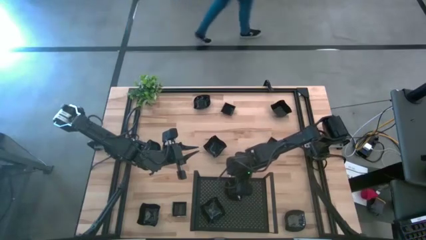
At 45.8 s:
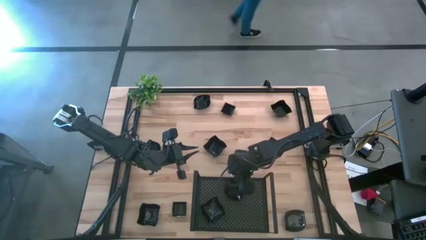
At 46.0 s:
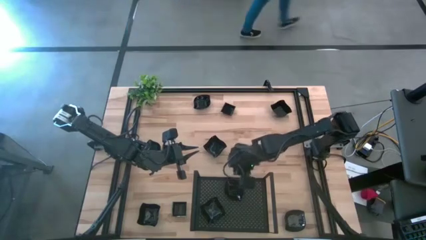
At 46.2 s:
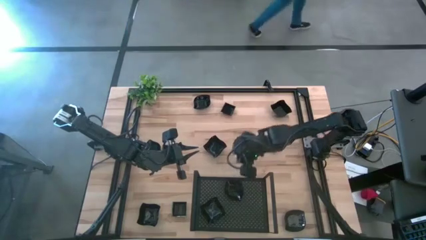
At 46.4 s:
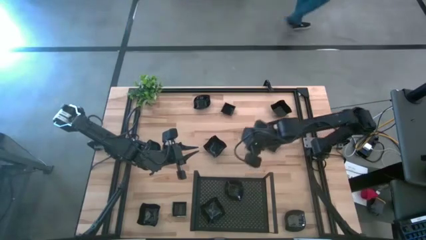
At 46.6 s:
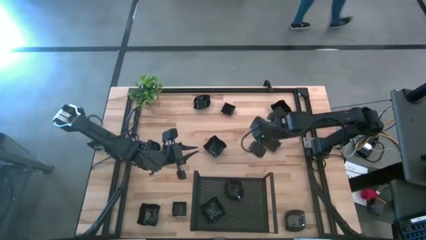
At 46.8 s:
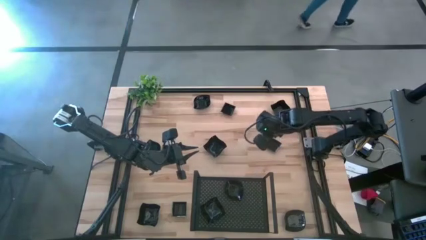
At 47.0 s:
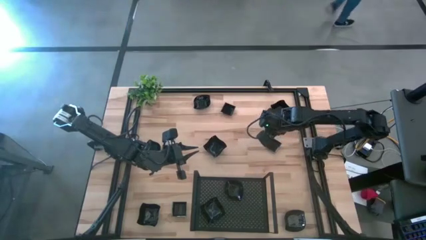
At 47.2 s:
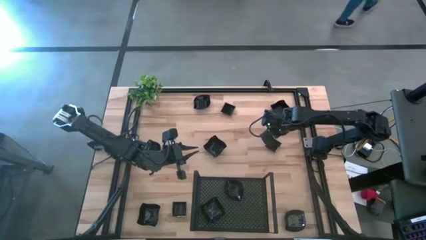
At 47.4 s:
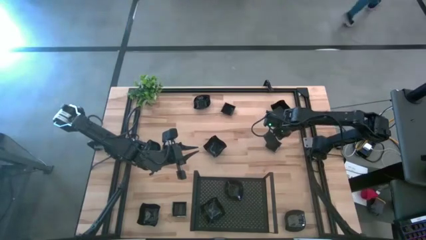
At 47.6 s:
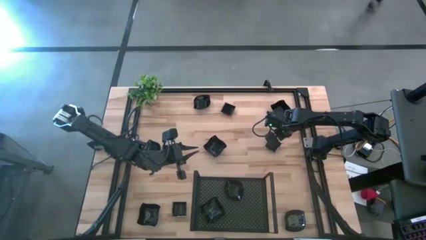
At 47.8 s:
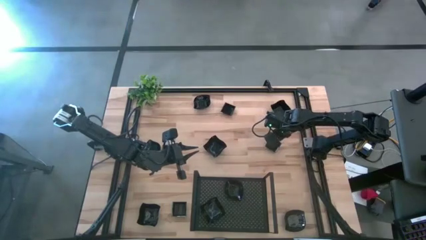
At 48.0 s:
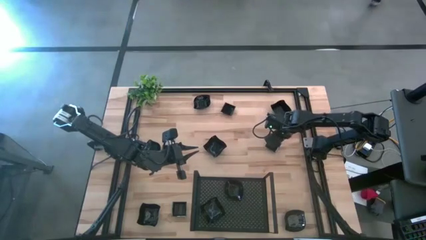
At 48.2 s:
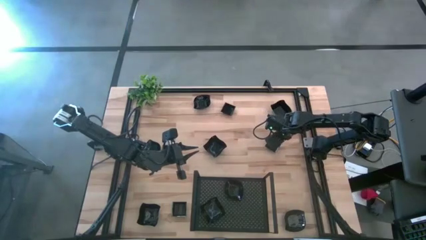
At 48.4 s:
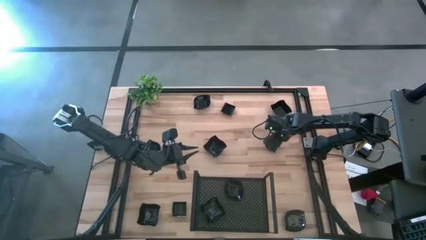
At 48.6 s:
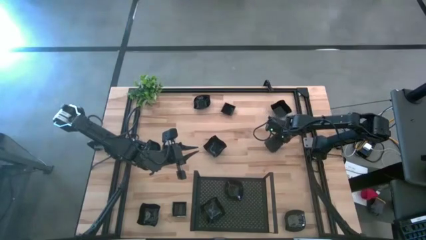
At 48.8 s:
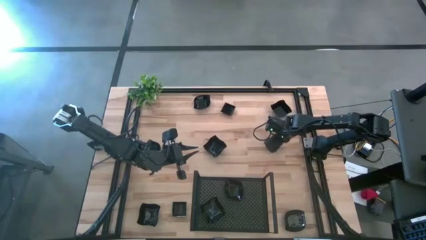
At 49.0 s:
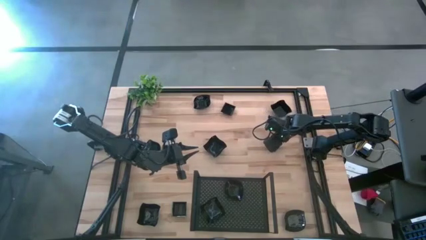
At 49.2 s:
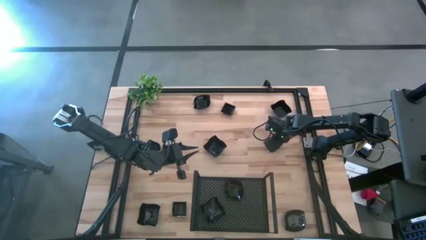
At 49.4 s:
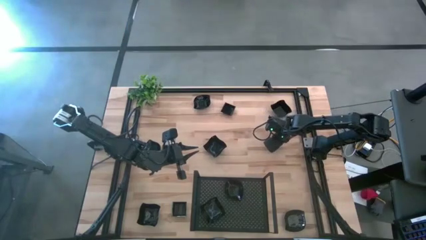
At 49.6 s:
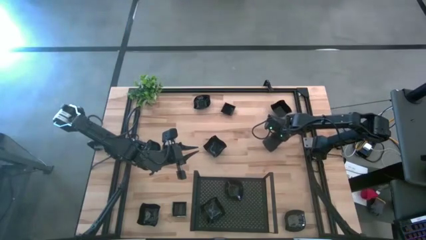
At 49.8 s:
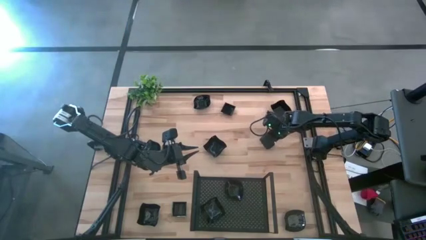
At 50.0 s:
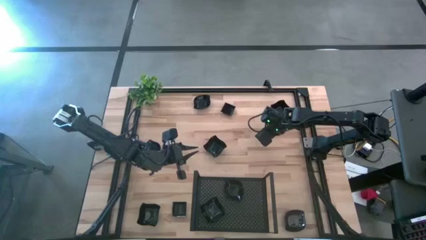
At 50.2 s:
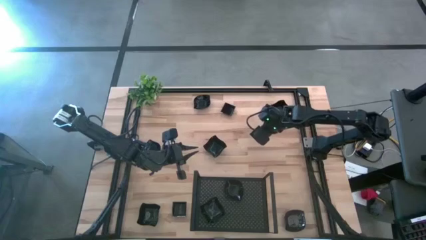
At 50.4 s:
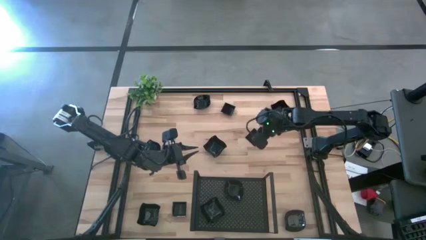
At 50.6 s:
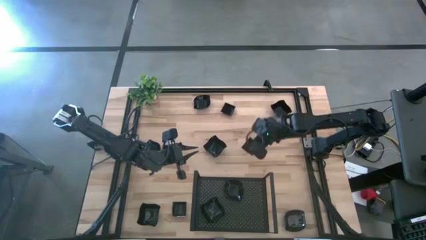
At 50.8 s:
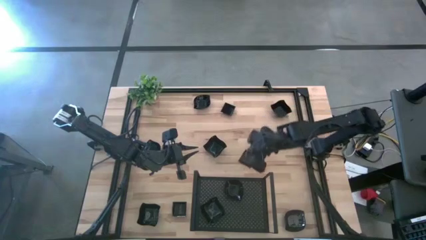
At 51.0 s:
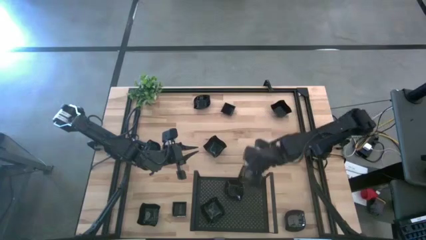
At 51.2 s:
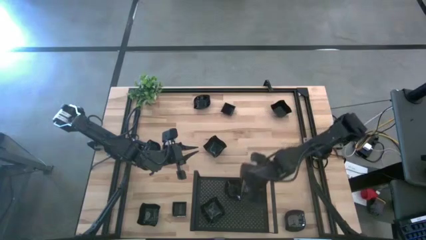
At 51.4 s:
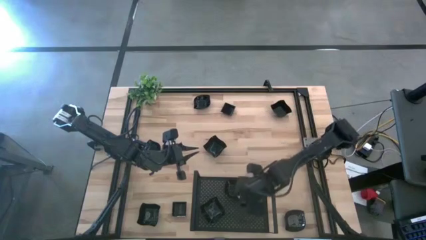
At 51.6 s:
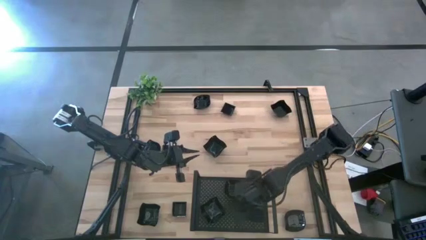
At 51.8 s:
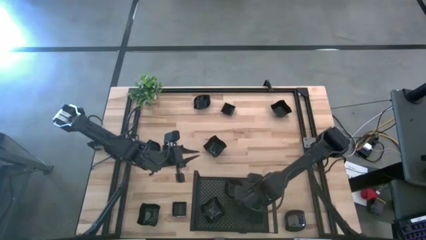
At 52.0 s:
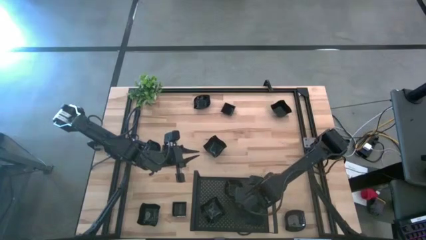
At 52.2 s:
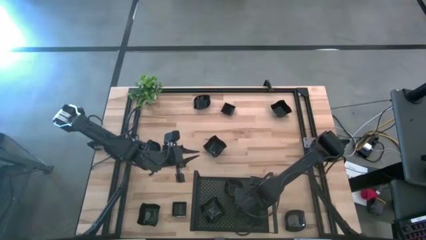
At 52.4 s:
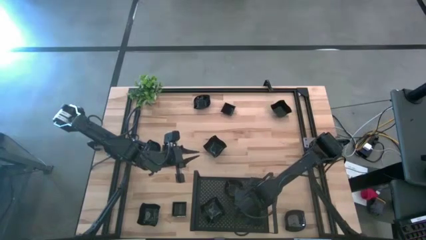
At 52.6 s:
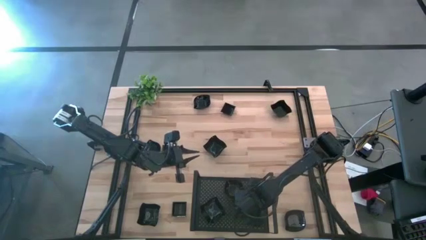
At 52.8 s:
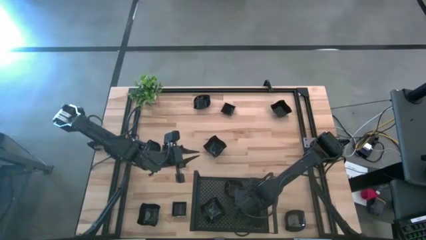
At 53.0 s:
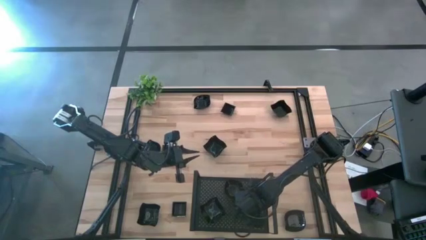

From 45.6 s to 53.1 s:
Task: Pick & Place Mini shaped plates
Put the square plate on the shelf

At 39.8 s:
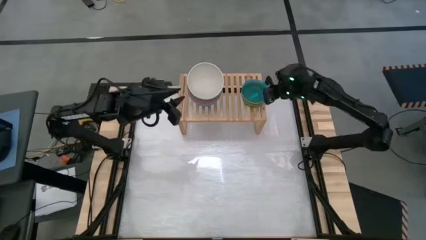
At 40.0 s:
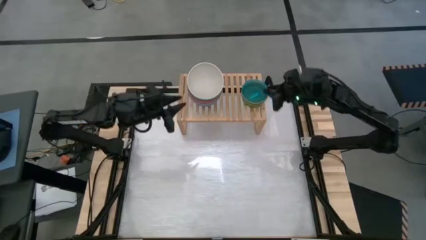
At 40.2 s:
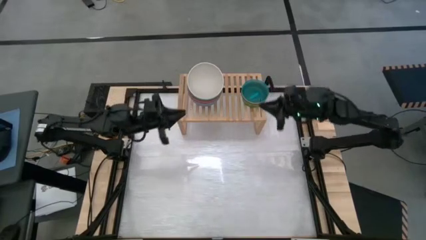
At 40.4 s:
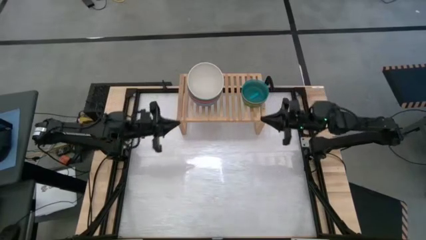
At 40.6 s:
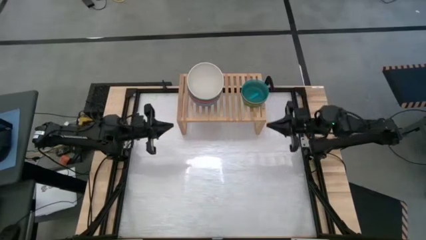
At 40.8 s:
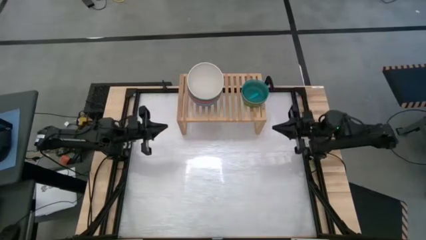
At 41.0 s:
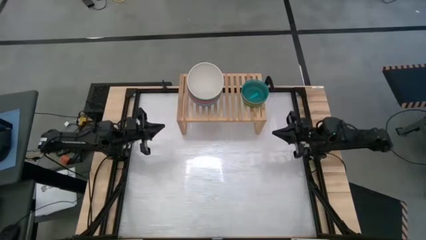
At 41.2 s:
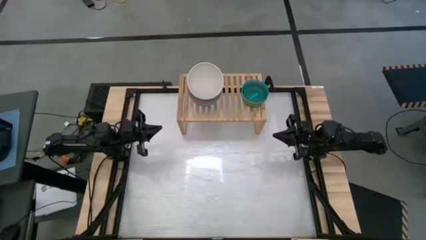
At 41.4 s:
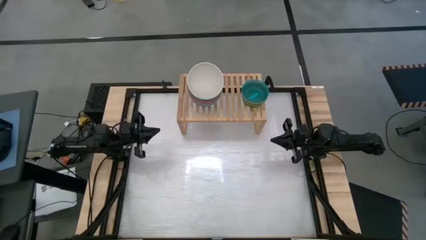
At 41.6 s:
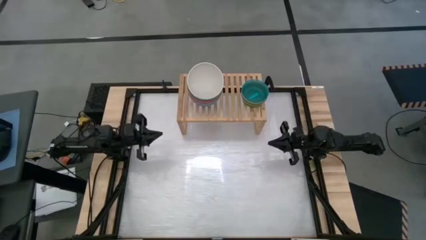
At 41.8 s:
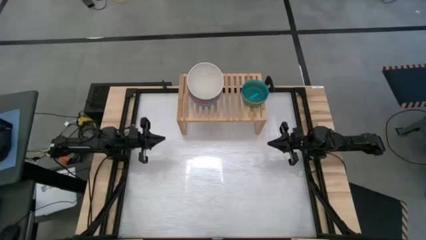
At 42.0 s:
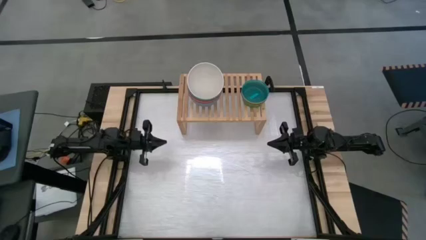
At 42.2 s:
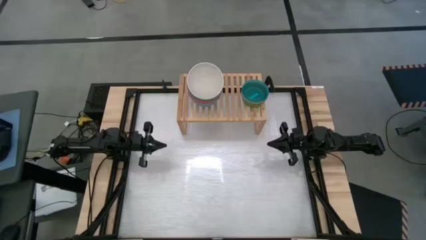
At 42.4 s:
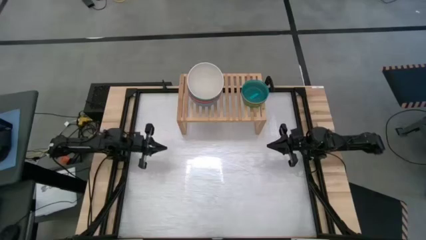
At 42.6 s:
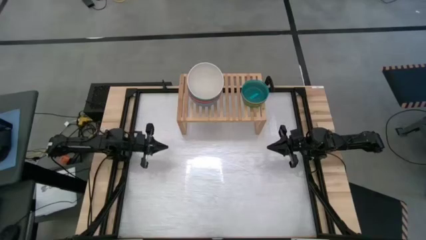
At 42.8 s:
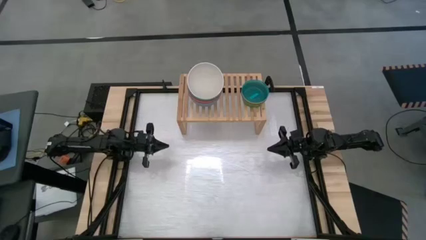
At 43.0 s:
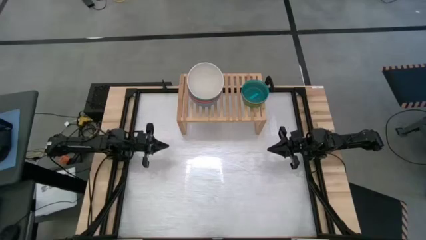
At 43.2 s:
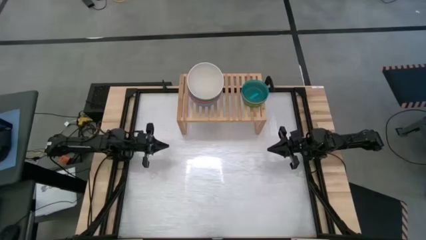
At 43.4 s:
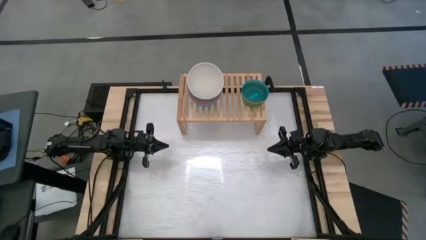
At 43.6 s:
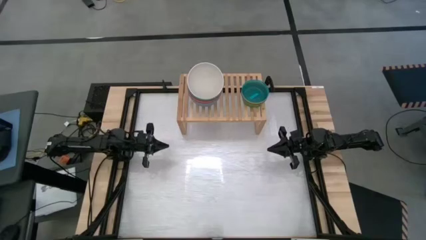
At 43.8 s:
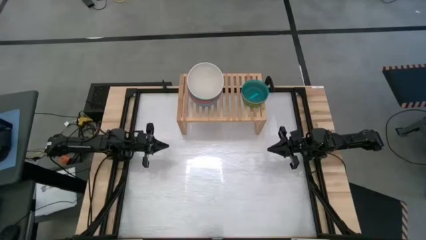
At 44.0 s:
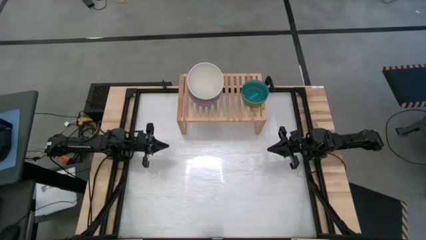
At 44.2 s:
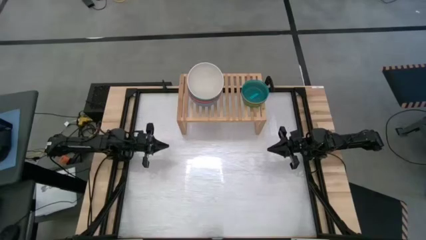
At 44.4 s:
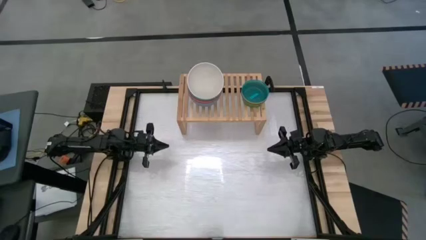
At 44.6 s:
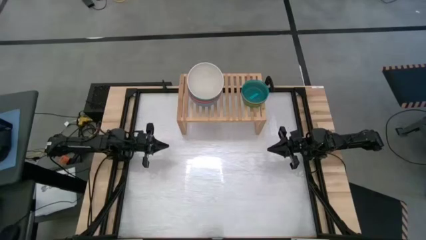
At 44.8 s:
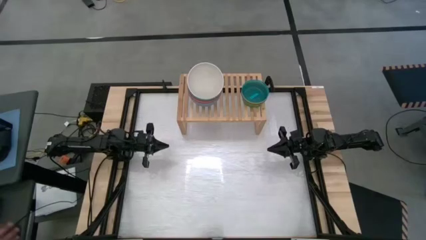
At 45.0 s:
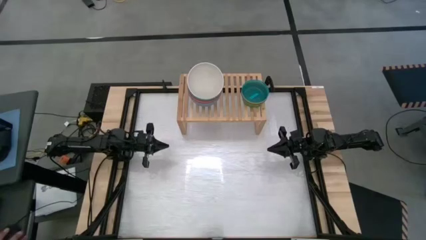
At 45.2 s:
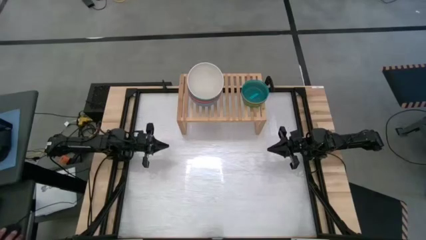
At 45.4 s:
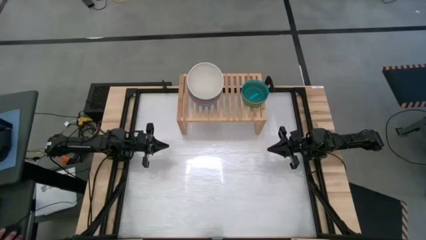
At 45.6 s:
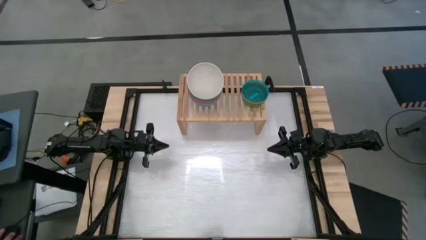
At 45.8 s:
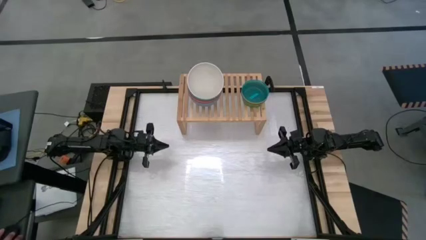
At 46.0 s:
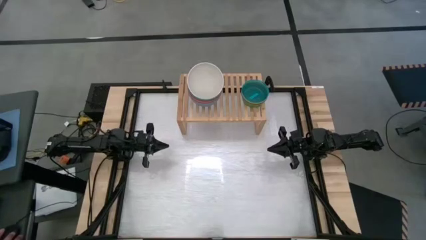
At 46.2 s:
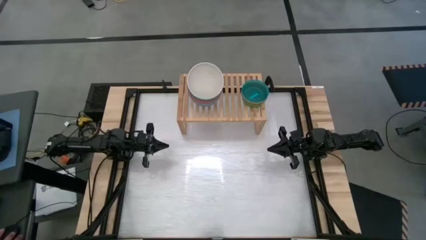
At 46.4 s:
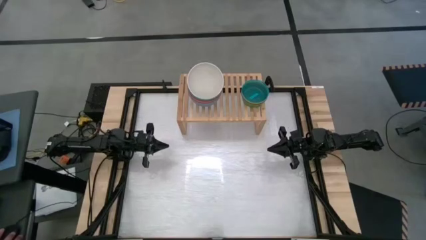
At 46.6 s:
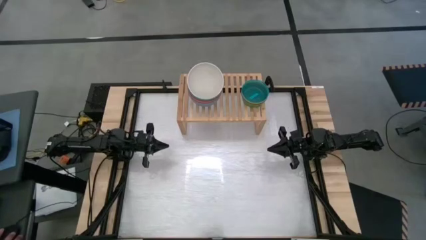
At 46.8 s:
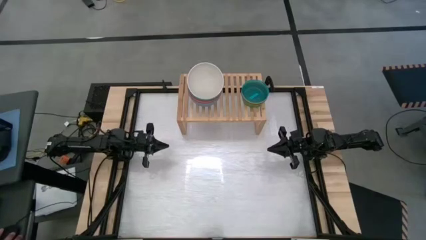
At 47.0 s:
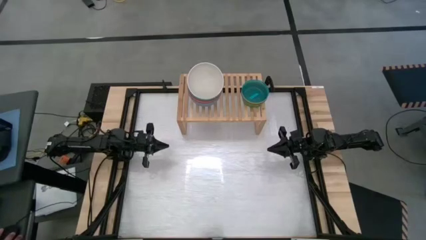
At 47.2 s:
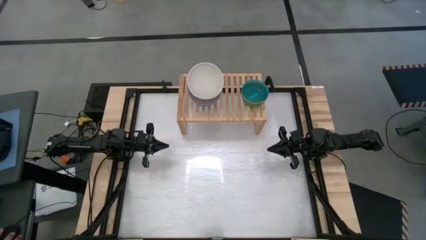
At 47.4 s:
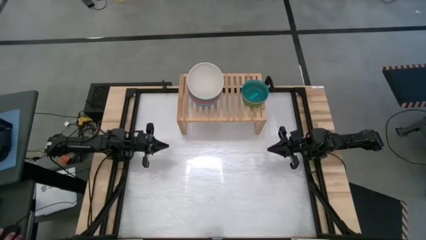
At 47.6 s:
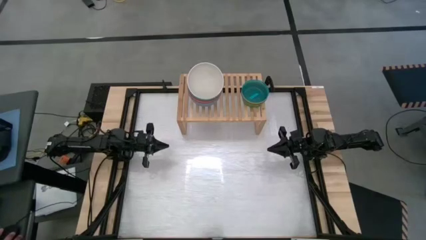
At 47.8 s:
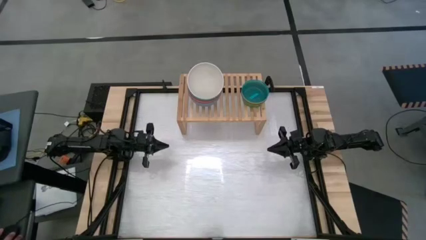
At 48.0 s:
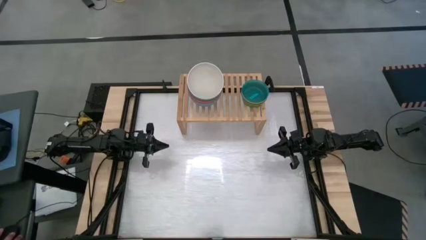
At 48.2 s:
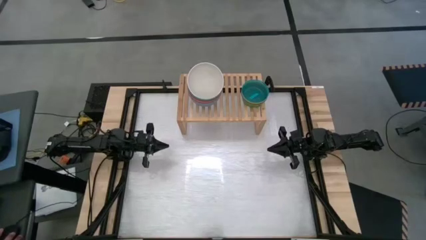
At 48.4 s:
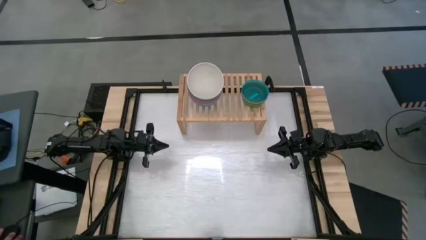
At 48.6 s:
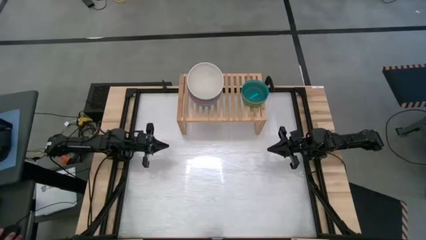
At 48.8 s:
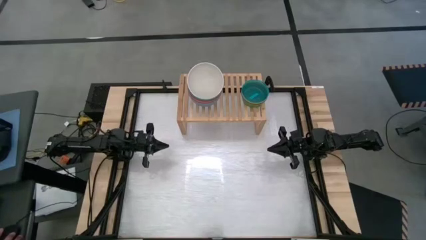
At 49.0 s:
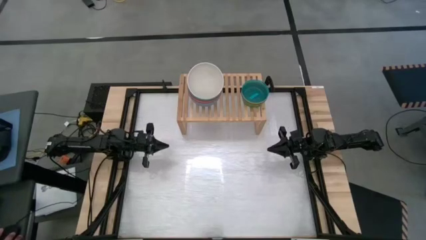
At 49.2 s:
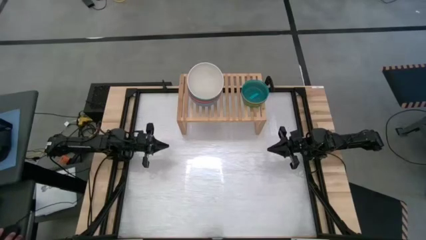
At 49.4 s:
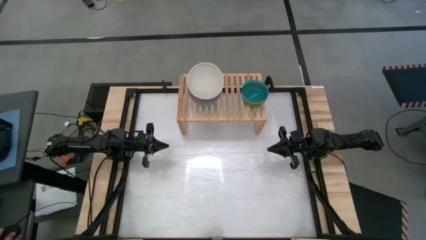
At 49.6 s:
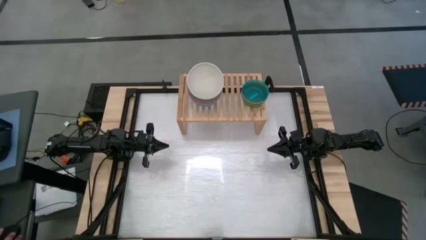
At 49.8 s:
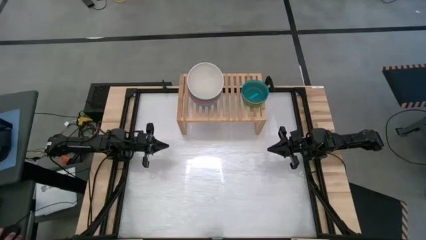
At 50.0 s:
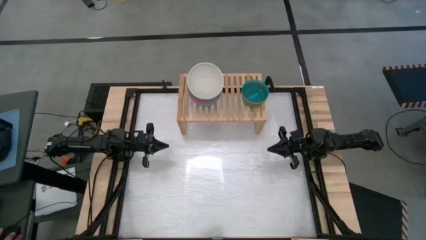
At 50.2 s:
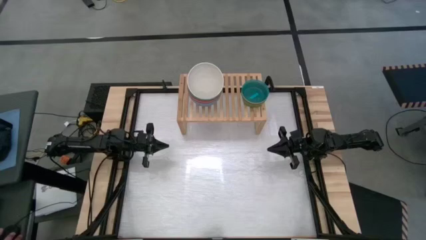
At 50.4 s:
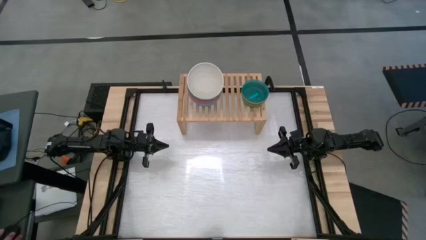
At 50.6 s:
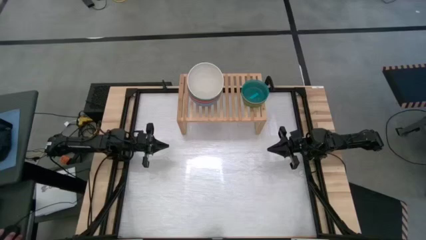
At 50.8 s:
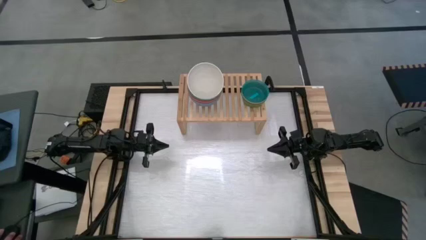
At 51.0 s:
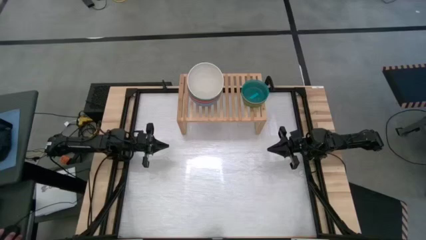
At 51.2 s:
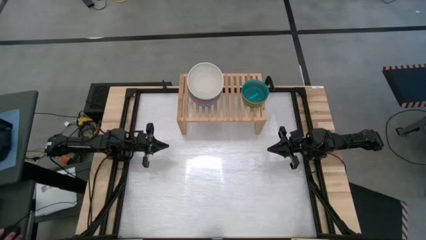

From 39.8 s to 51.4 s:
Task: Place and stack bowls onto a shelf
Return to Home Position
